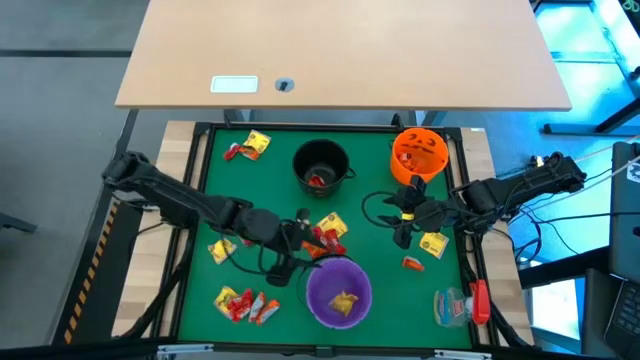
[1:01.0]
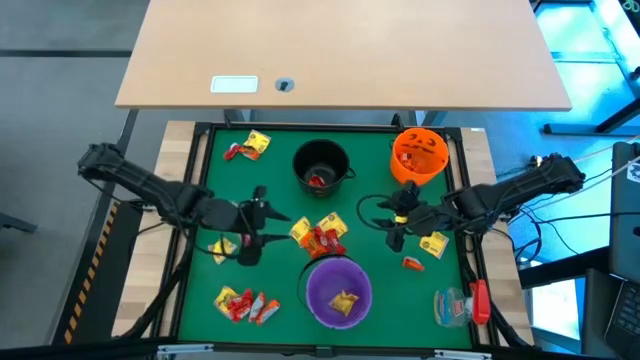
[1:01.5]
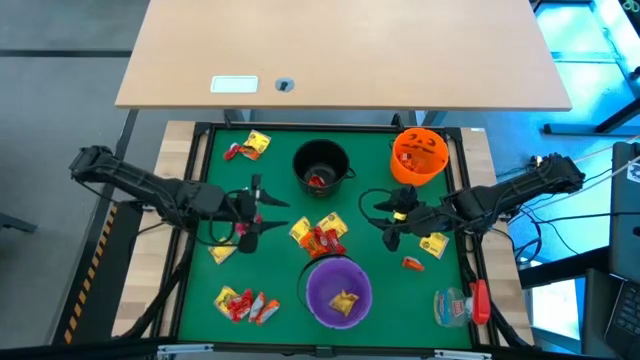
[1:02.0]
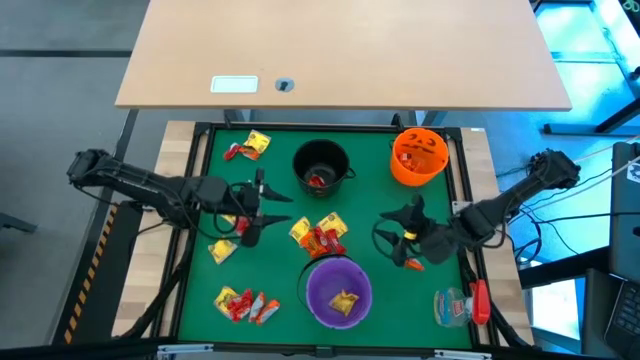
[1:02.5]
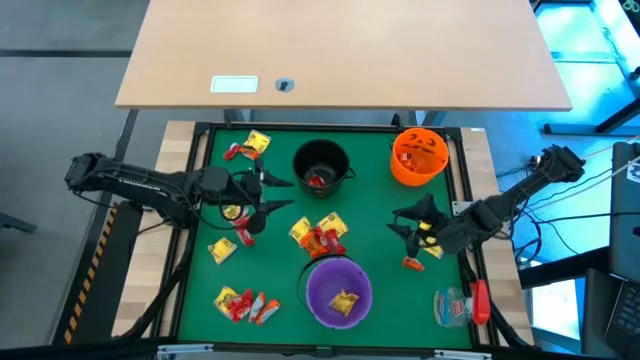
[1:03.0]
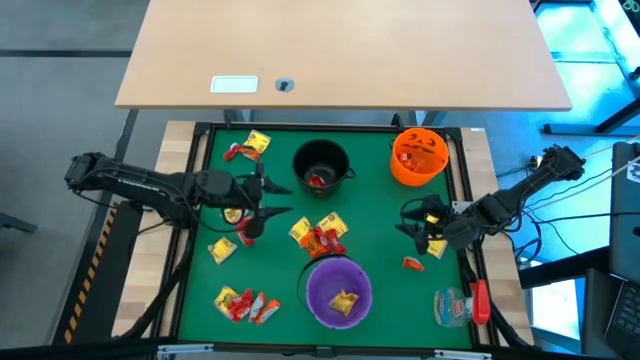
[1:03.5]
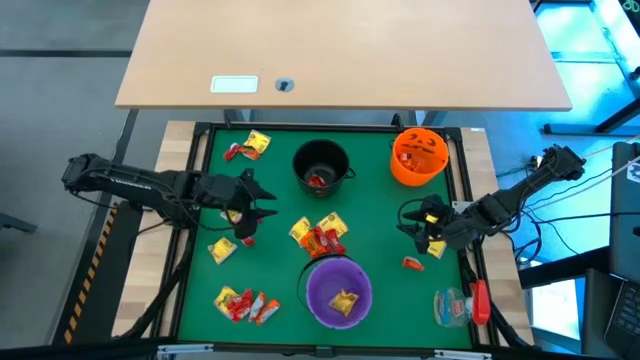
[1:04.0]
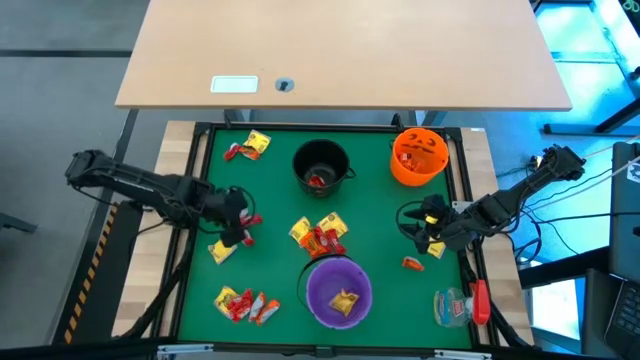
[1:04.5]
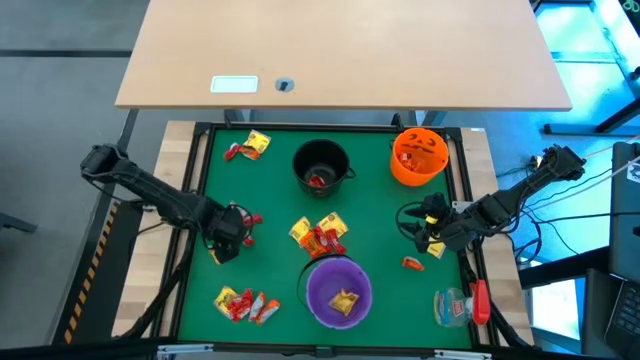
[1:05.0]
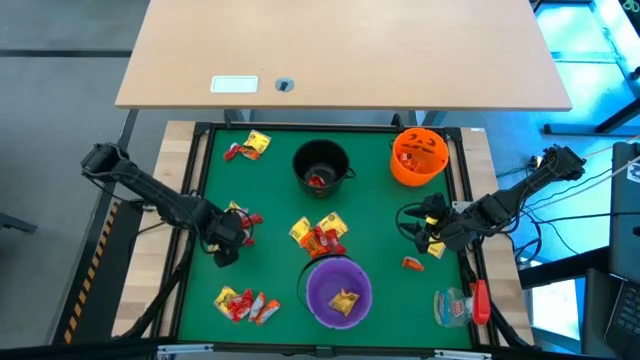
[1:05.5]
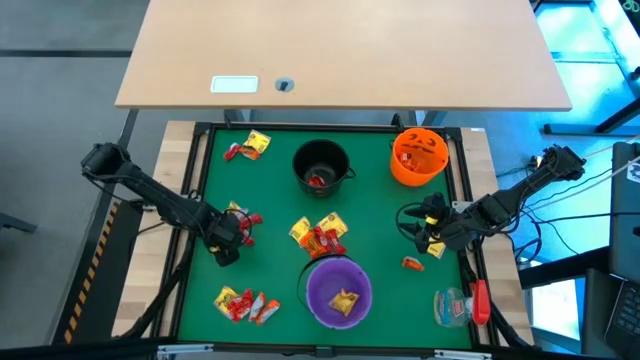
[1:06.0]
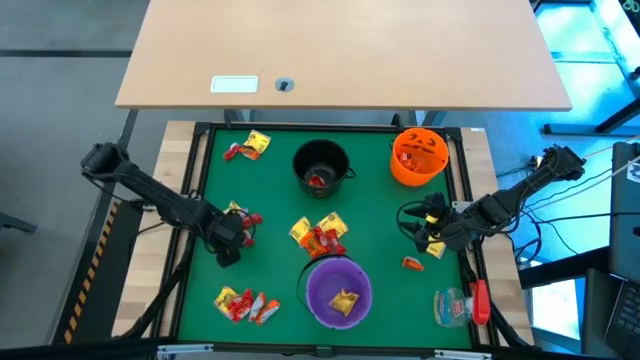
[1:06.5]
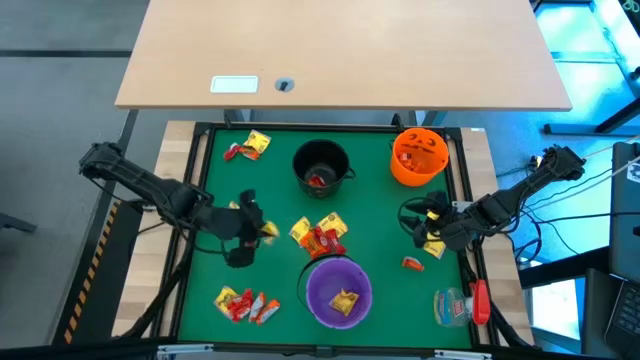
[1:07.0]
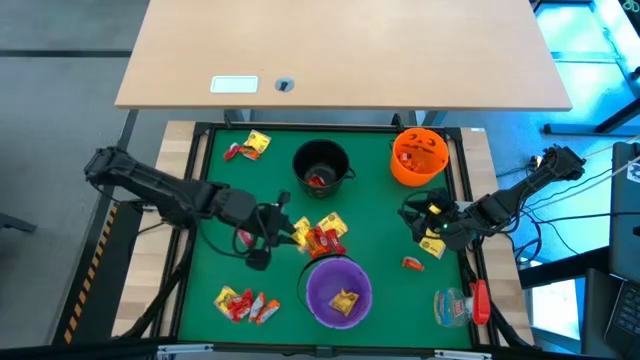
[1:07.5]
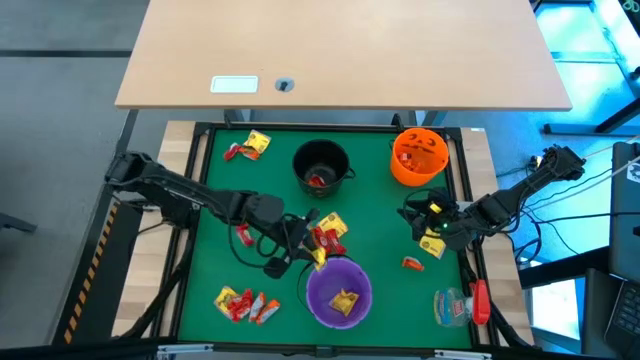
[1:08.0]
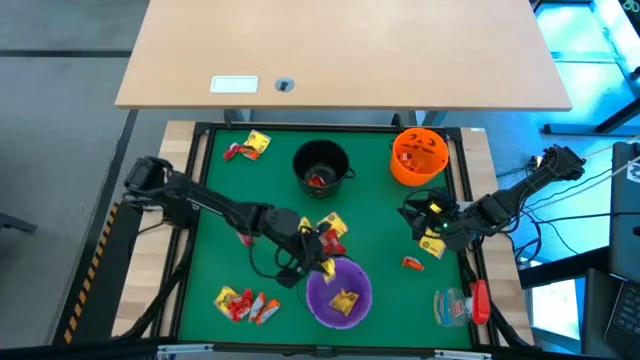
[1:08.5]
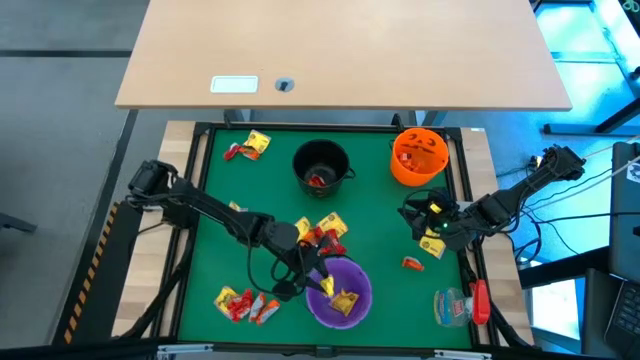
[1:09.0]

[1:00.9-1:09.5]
Task: Sort candy
Put the yellow candy into the purple bucket

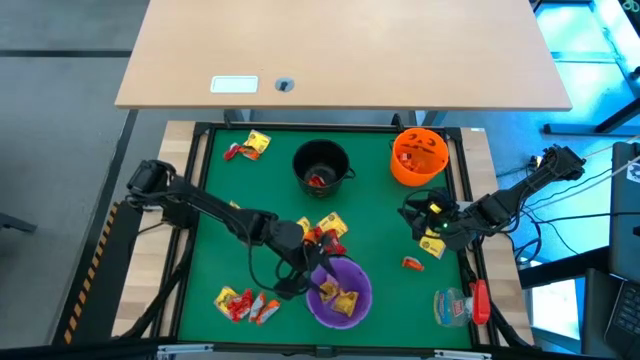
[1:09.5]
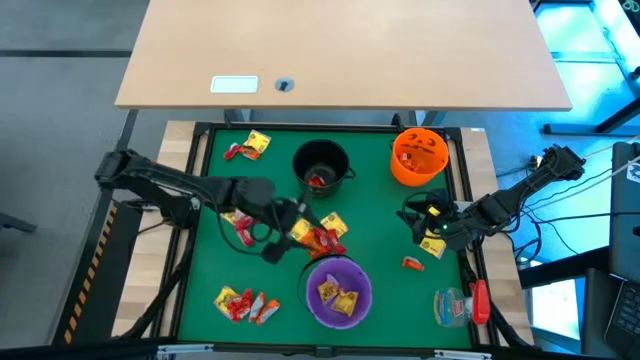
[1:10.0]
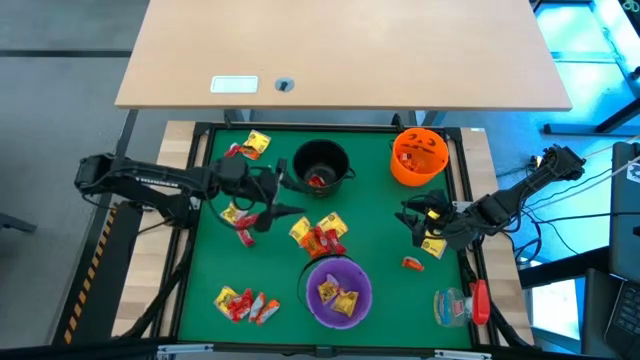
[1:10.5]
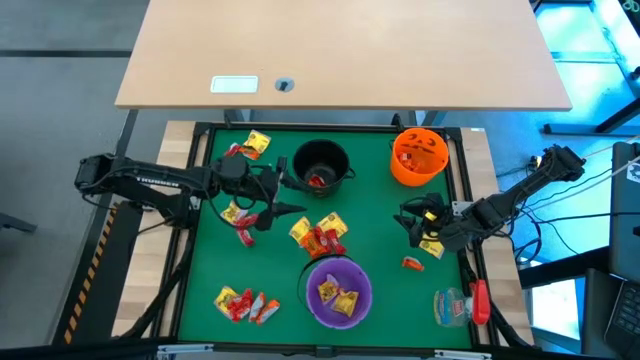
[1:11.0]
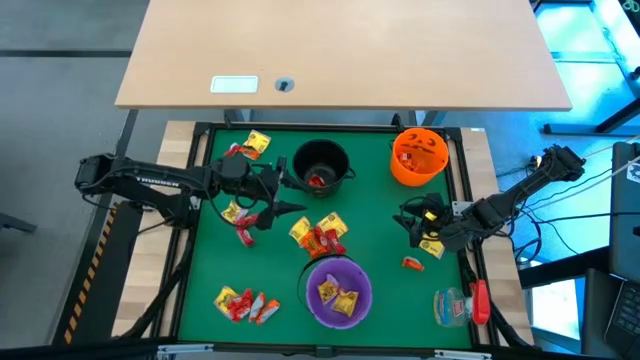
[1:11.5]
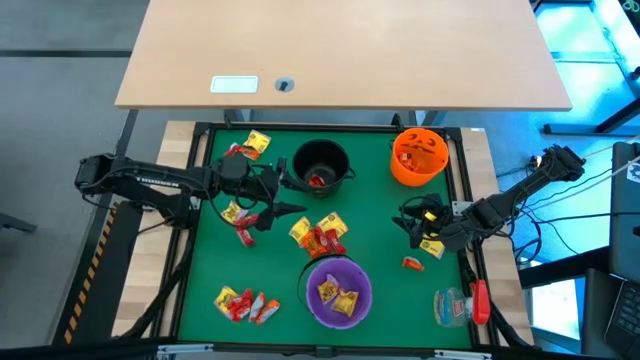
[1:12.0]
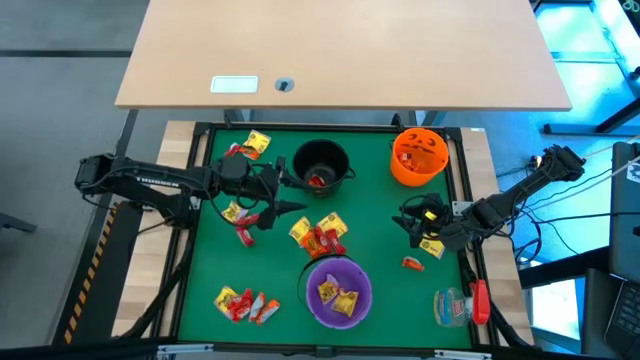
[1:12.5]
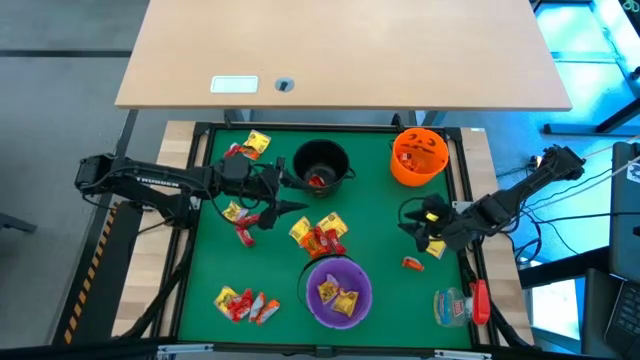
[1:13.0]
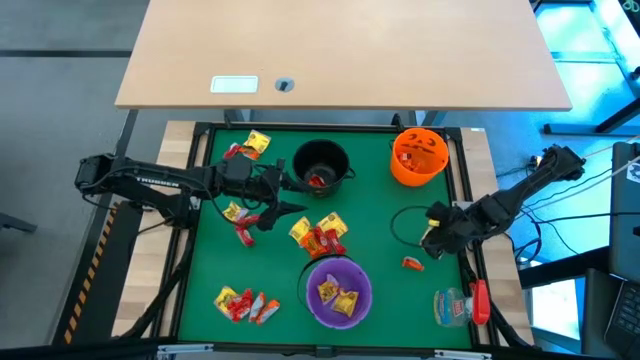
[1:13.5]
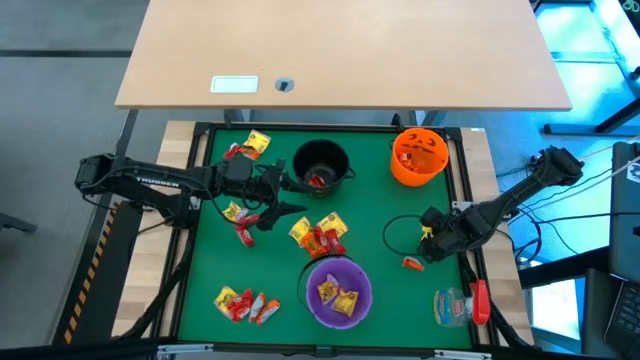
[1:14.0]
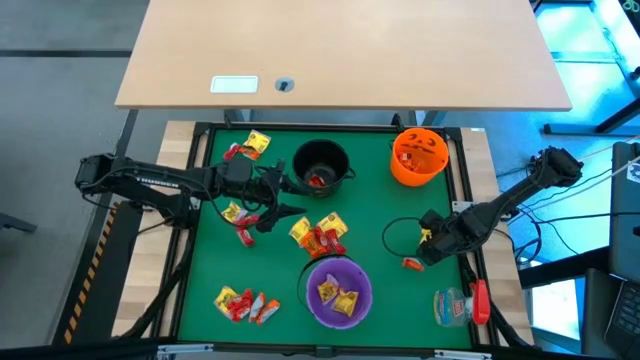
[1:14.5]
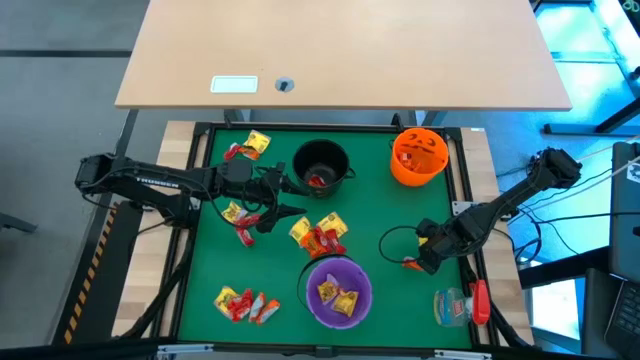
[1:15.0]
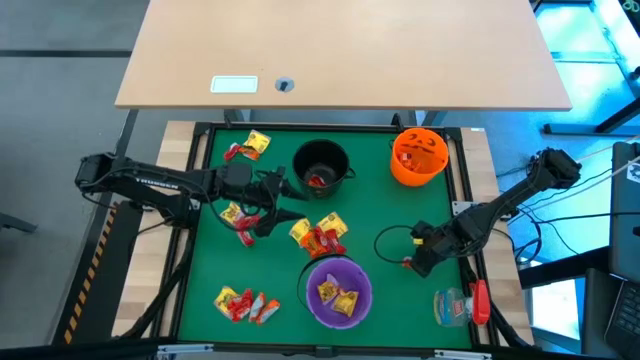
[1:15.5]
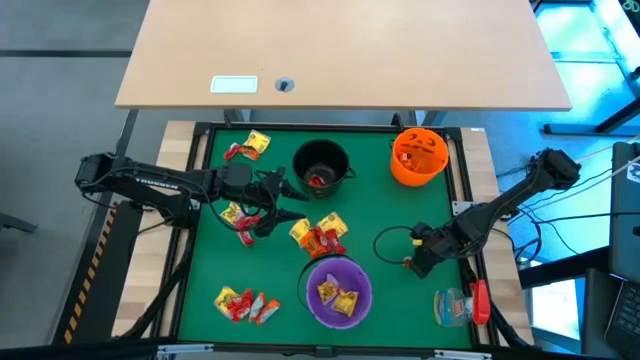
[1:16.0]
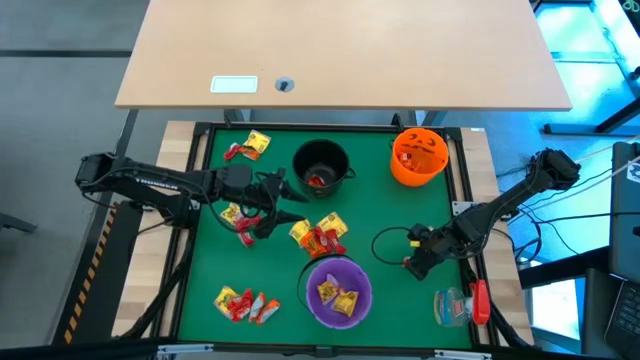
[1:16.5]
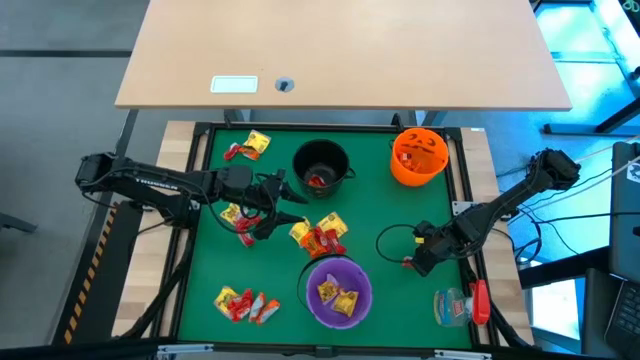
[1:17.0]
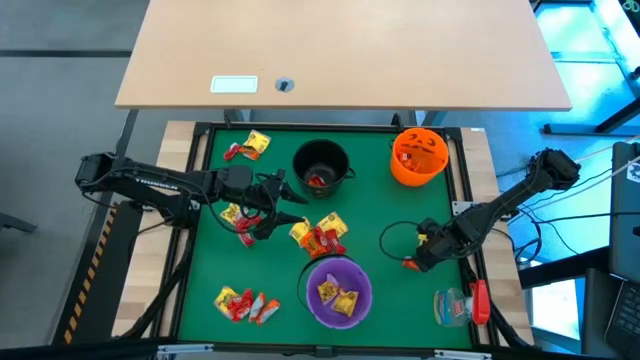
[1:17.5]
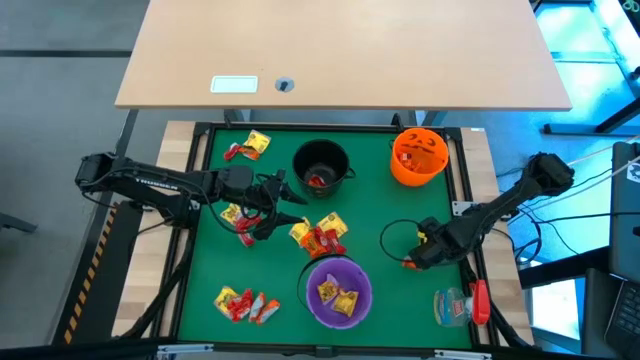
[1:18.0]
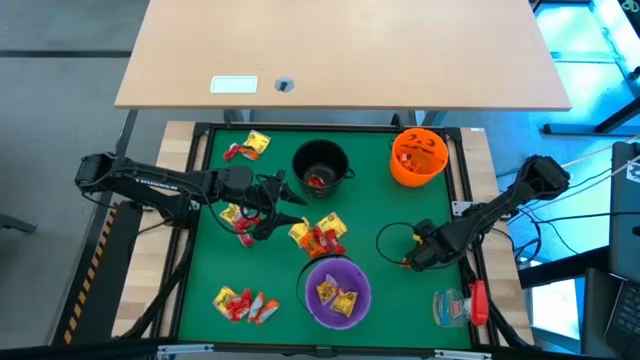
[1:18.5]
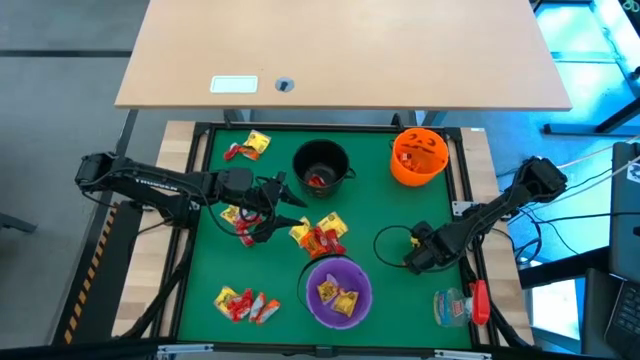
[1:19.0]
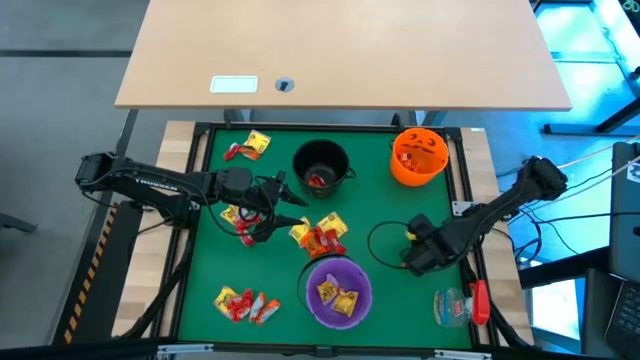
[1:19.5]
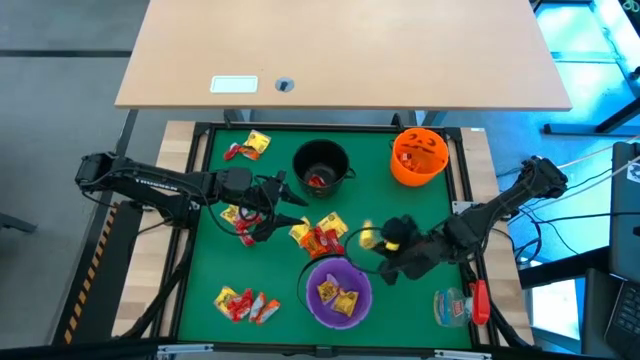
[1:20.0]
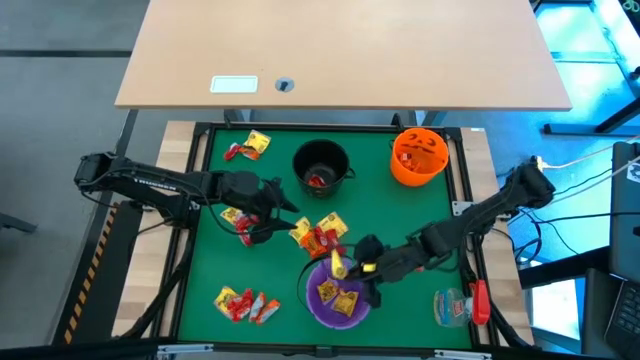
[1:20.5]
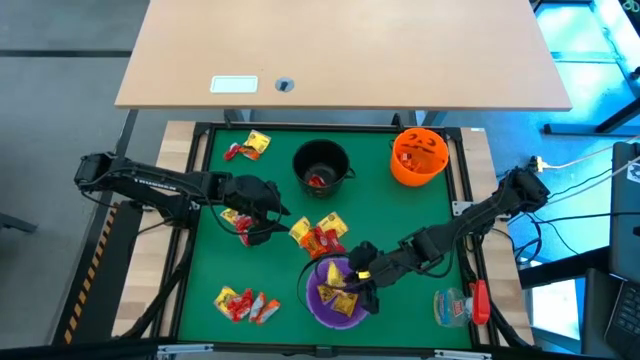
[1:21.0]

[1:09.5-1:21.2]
Put the yellow candy into the purple bucket

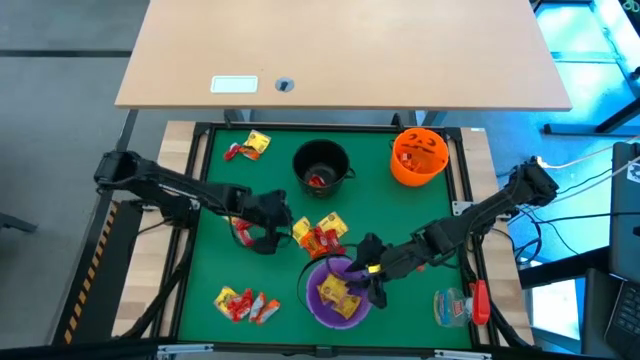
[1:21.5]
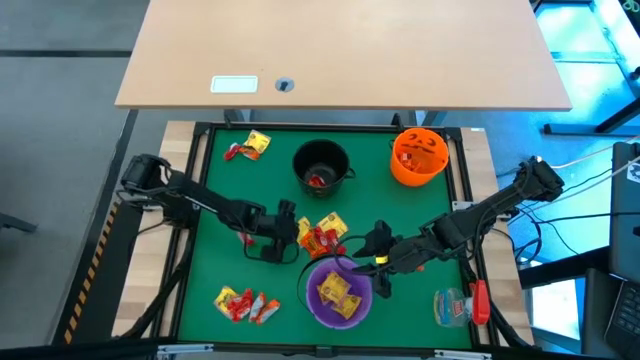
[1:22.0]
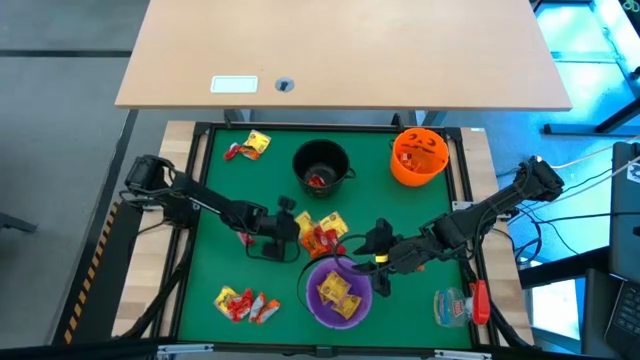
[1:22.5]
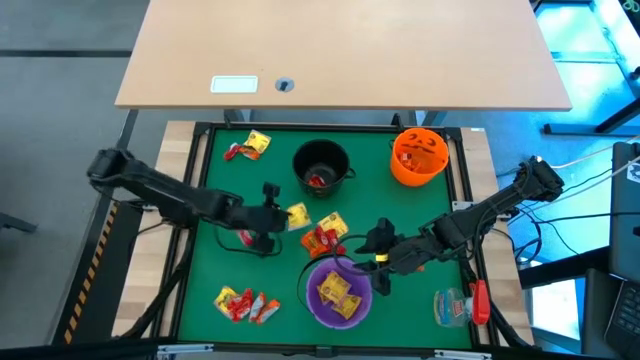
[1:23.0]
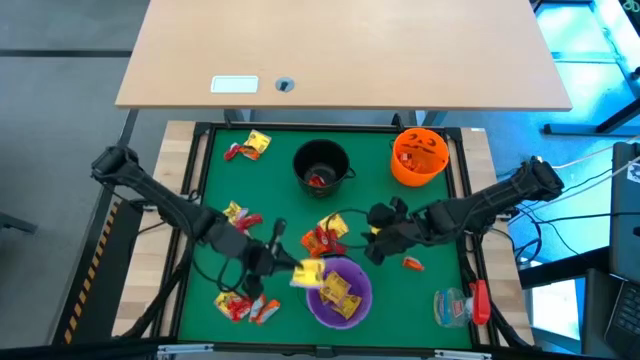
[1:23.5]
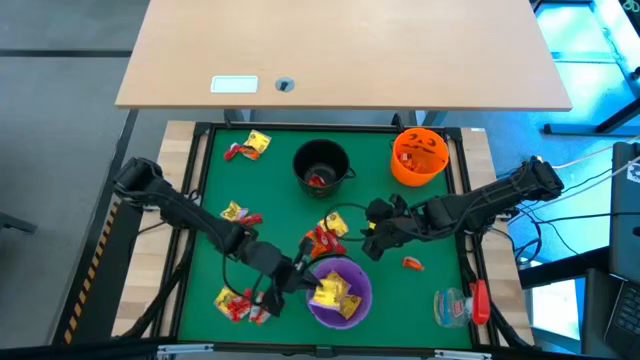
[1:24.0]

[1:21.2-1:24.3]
Put the yellow candy into the purple bucket
